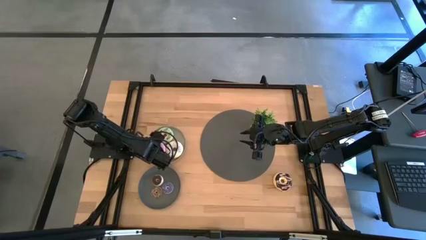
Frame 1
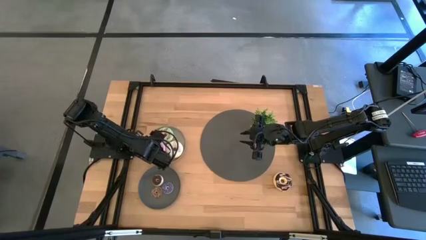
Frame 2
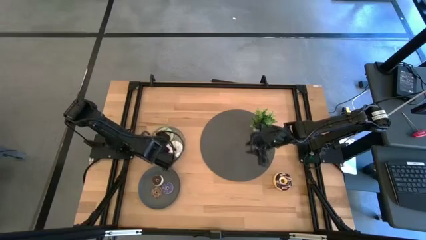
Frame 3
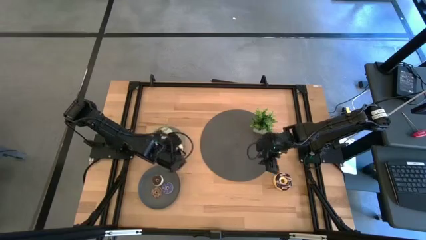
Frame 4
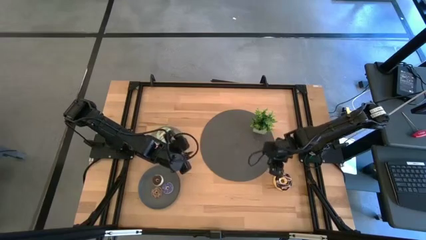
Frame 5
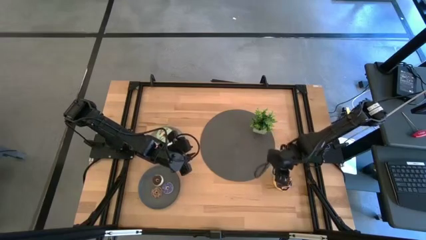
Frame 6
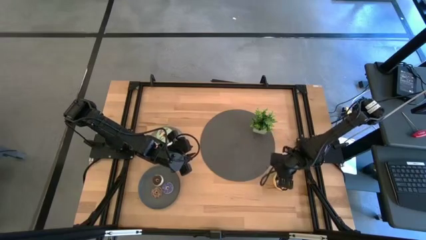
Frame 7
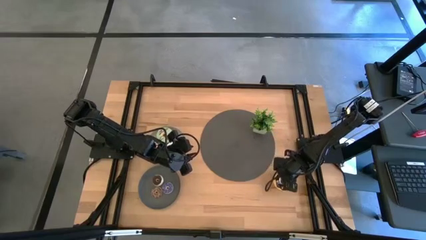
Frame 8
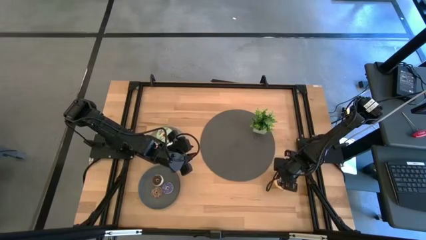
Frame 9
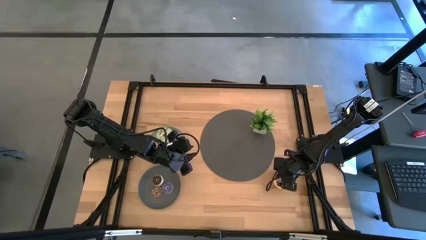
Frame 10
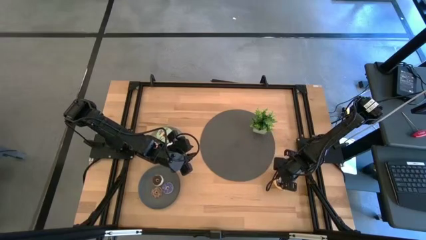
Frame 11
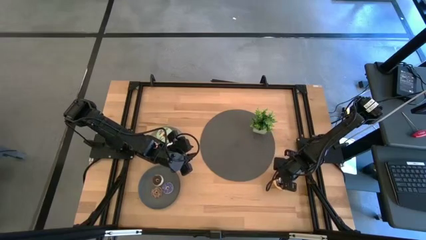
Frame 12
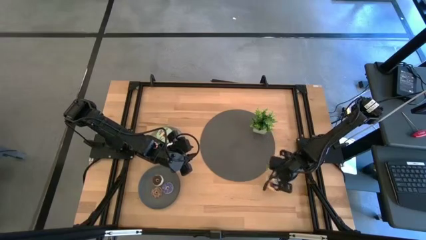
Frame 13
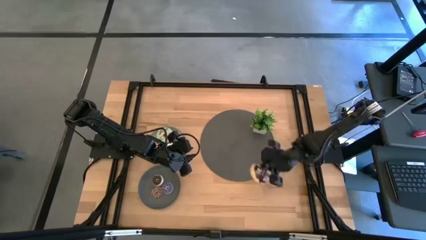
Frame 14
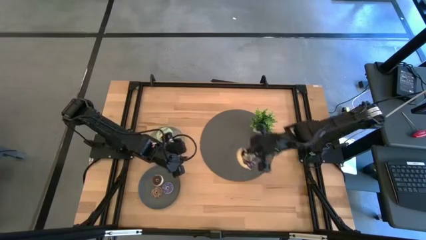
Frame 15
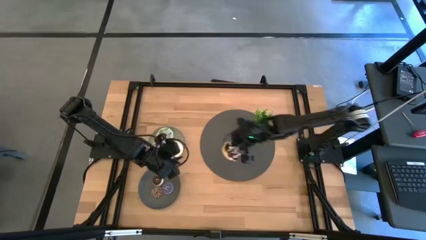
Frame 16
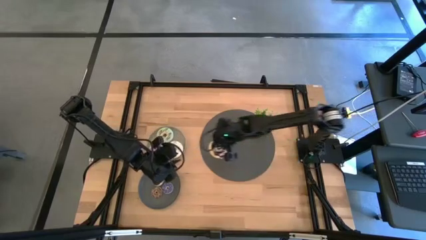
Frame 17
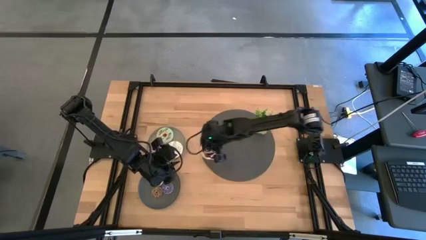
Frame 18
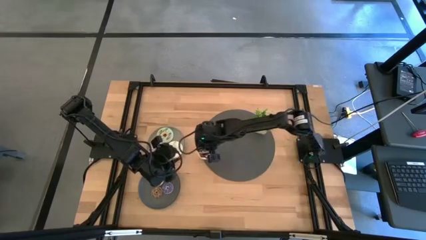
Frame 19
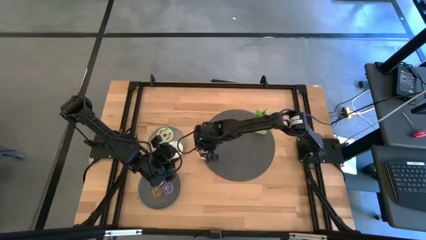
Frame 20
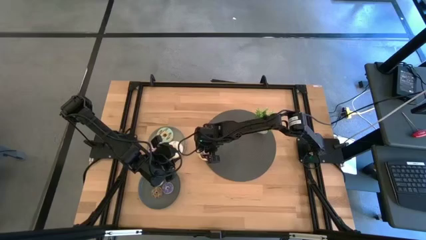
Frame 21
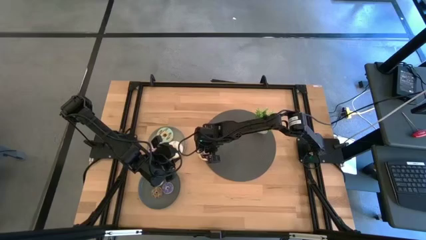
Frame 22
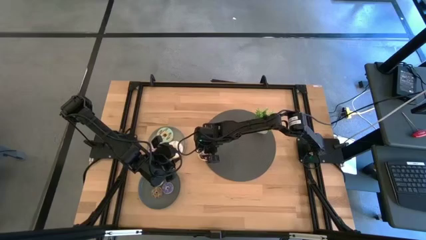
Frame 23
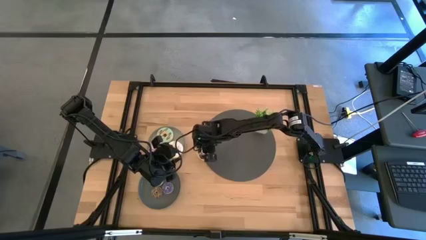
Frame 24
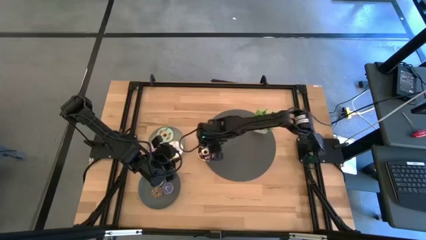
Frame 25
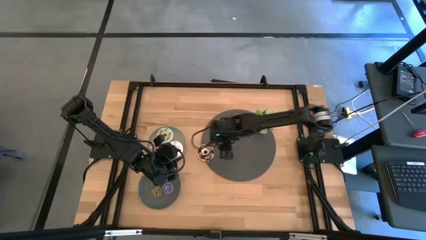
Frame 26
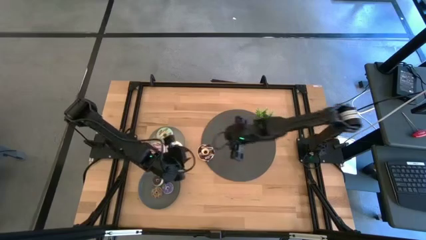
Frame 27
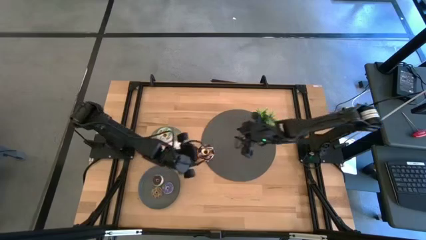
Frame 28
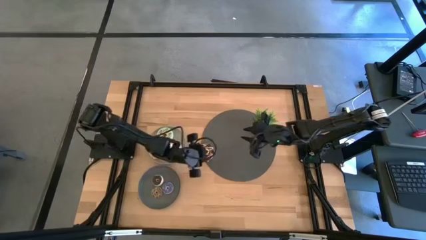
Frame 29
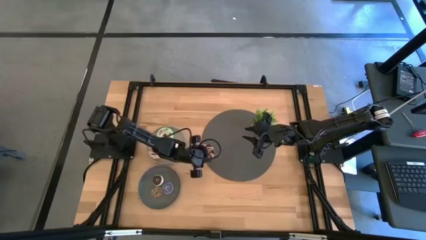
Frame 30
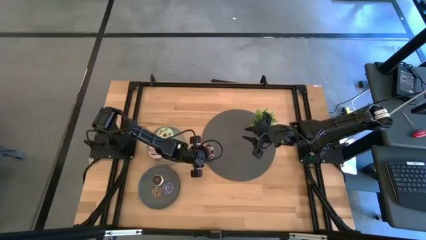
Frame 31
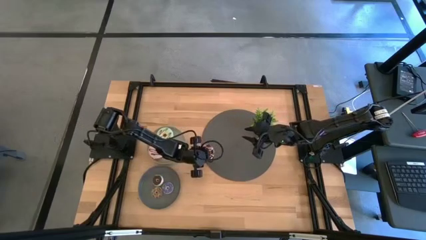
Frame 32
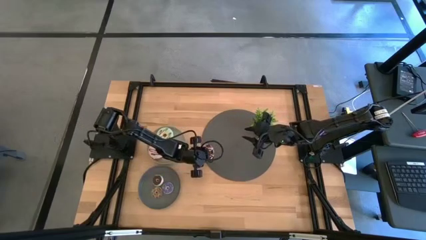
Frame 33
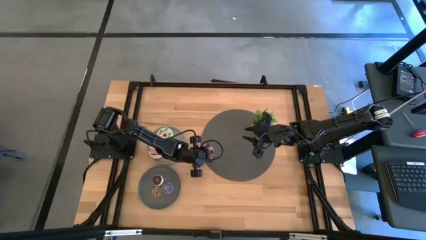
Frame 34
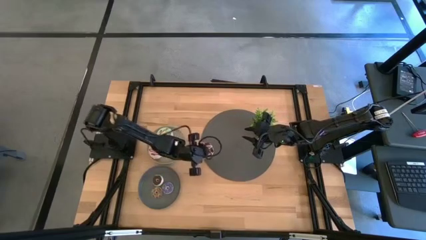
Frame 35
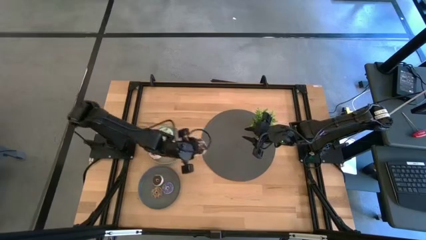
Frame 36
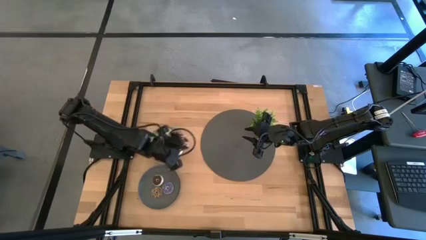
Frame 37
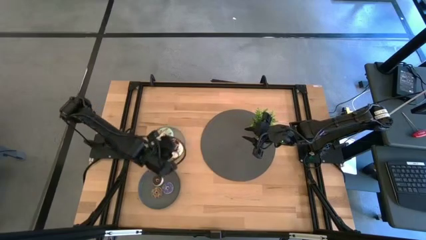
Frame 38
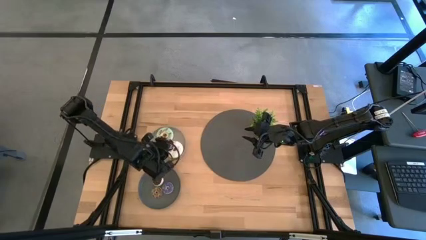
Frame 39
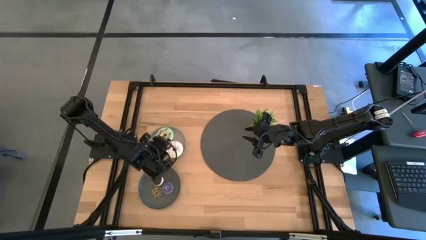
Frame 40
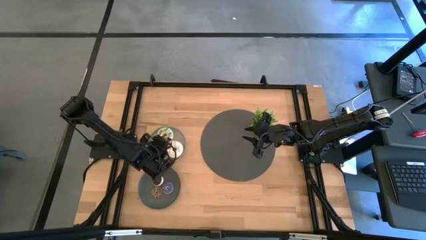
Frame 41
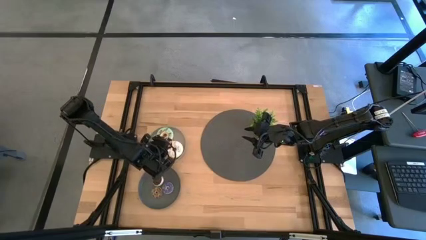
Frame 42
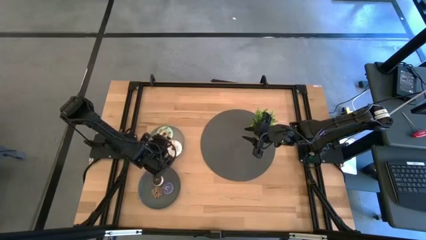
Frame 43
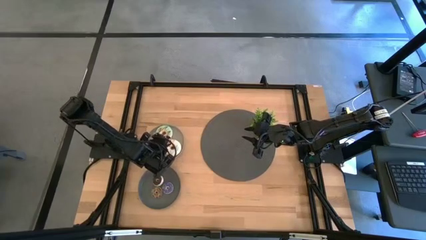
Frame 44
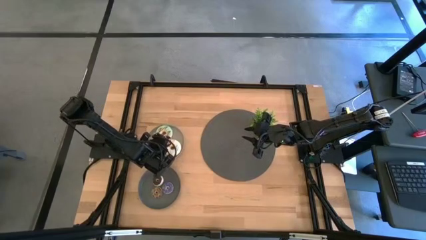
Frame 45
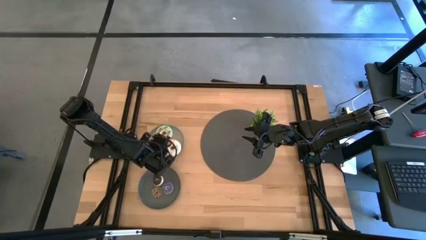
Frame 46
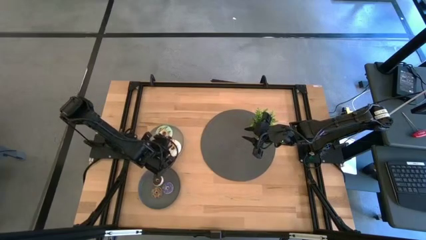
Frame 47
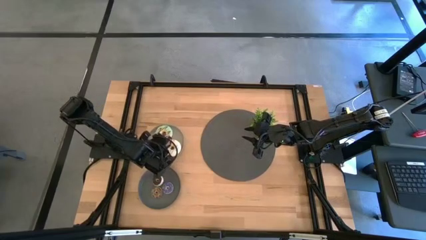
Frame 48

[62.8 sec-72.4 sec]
Task: Pick & Place donuts
Put the big brown donut on the light gray plate

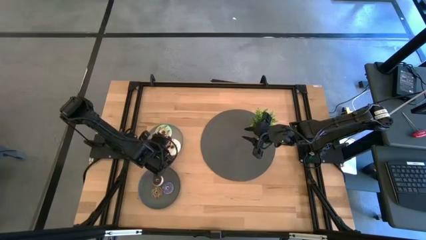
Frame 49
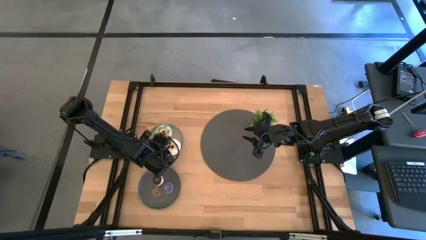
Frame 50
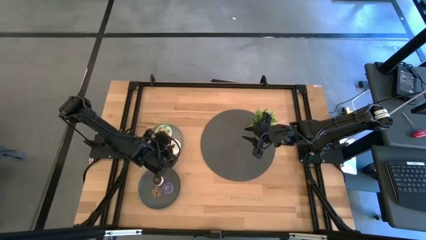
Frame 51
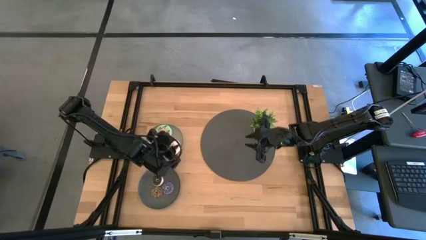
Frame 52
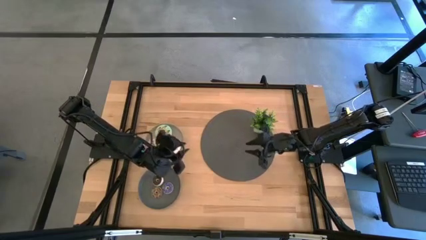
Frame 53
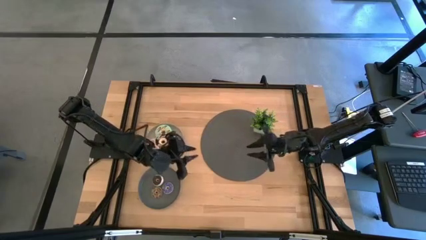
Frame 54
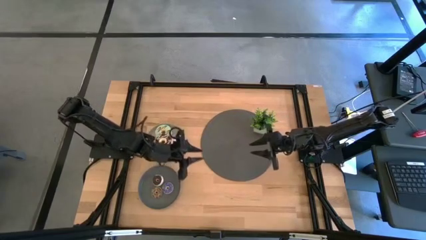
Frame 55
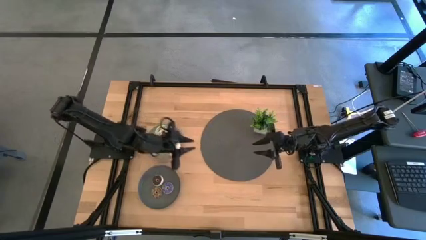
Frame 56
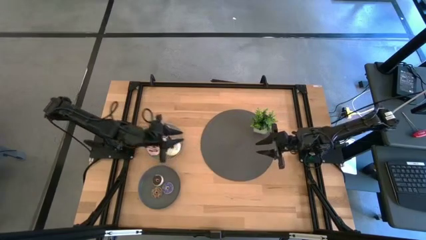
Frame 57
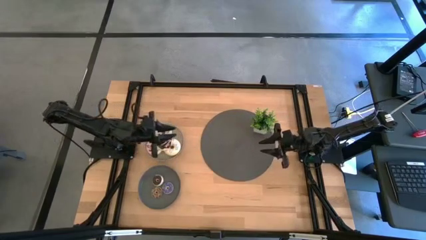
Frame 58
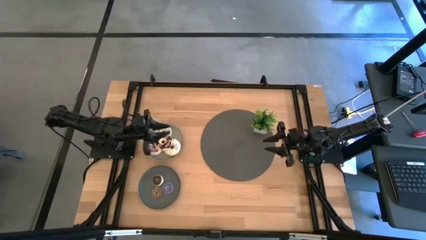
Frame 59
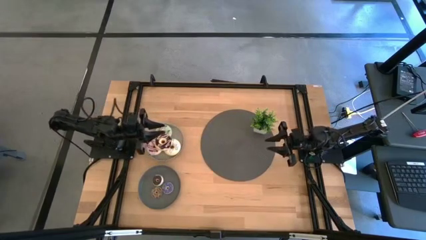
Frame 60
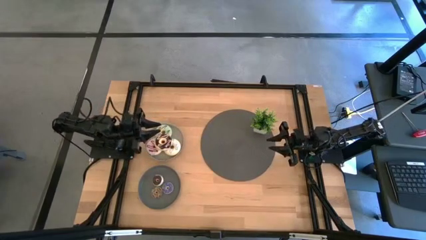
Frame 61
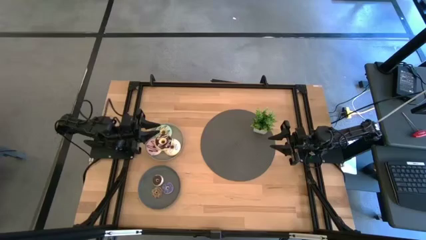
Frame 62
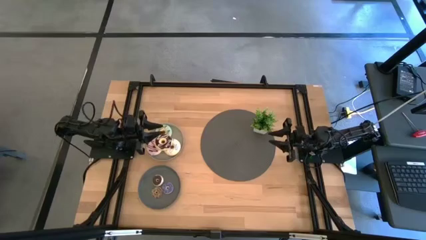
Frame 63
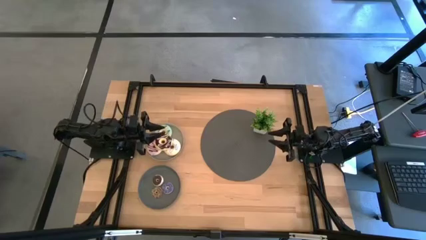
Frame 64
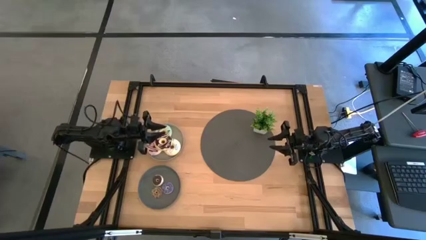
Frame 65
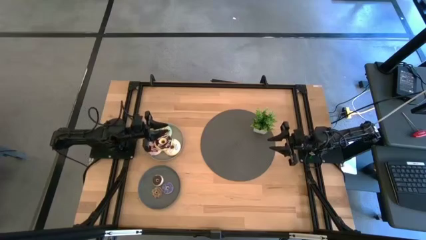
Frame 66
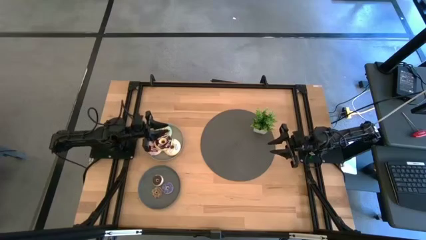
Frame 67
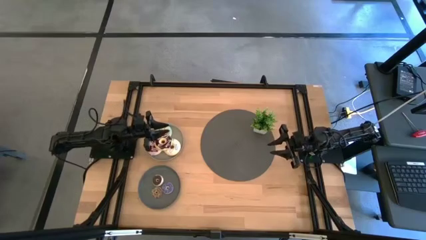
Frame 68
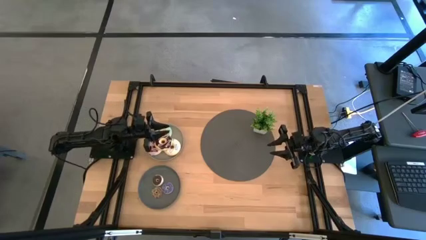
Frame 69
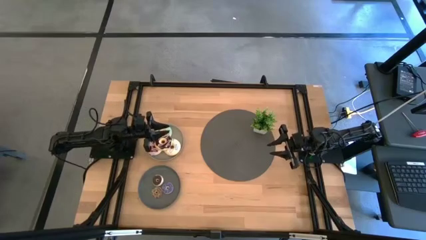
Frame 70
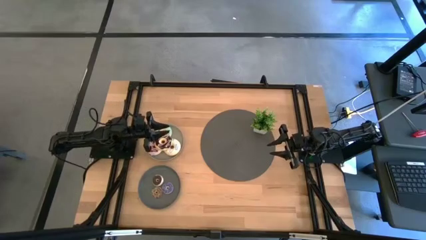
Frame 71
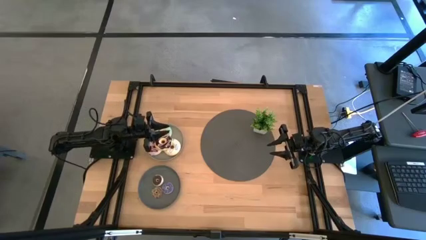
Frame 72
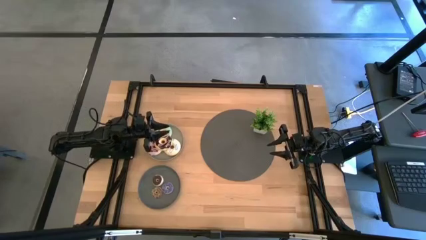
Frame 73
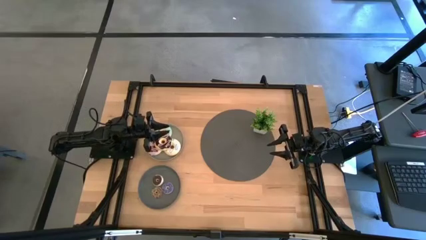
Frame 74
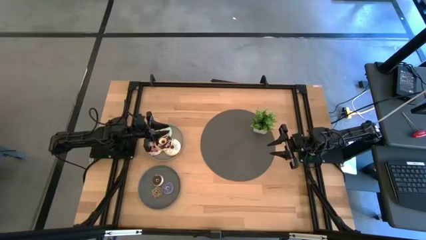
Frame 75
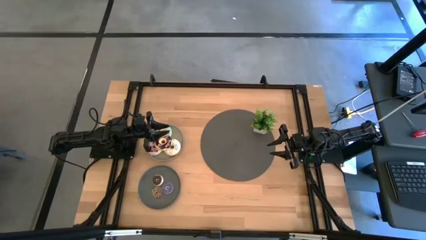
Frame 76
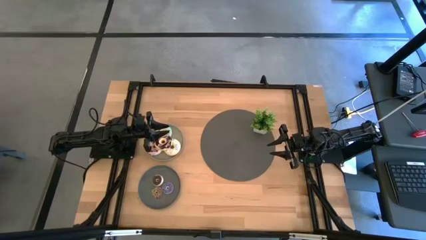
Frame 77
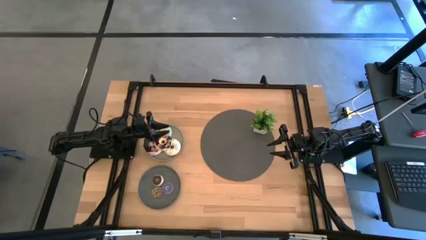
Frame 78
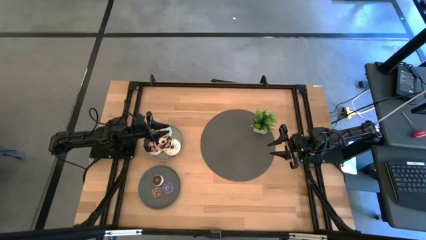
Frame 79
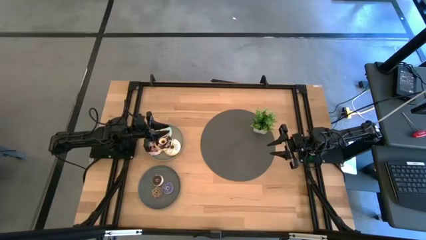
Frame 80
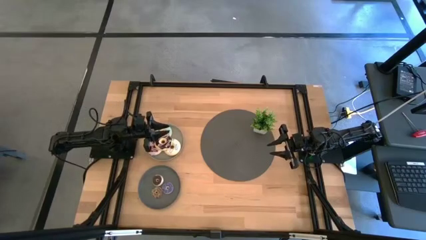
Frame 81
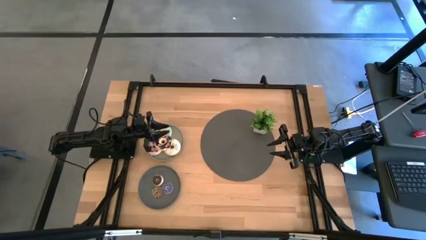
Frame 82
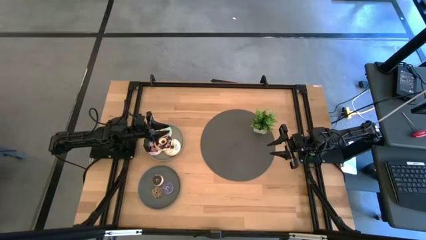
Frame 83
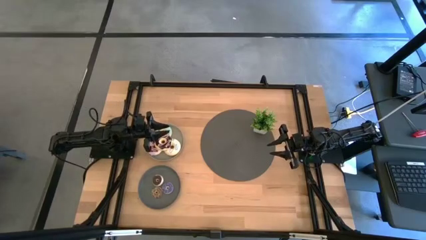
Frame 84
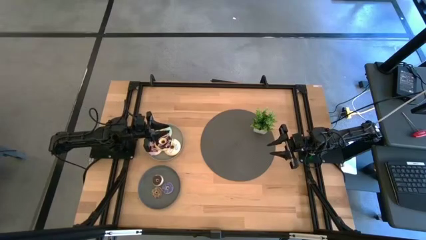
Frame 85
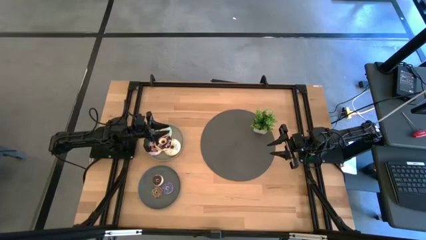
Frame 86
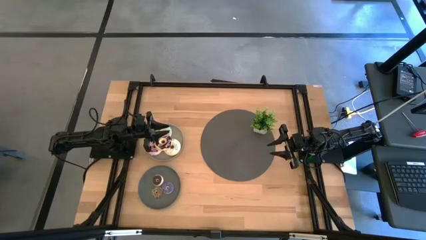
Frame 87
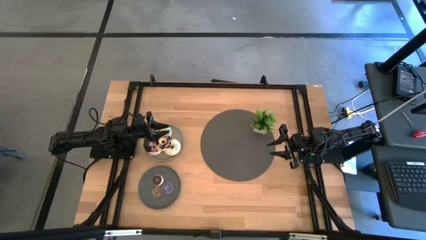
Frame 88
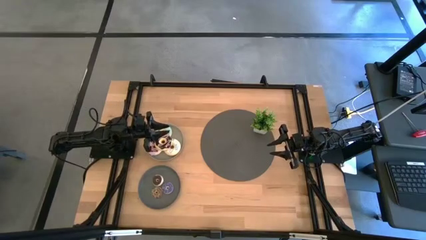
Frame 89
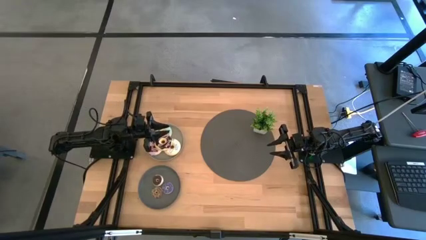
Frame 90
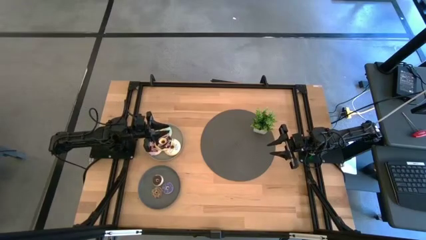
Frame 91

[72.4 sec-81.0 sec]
Return to Home Position
